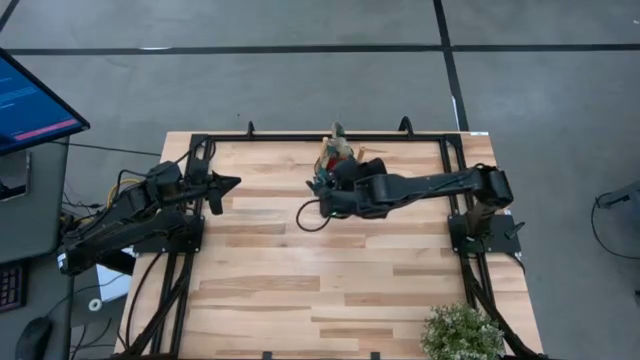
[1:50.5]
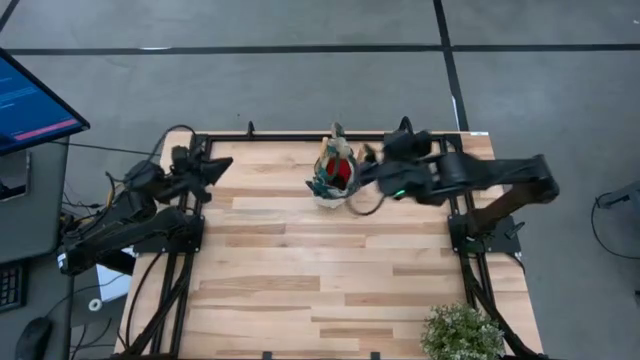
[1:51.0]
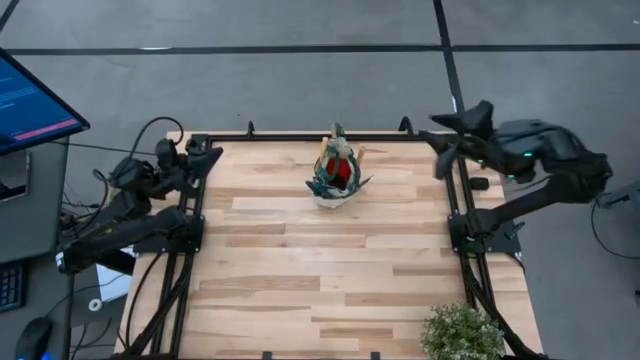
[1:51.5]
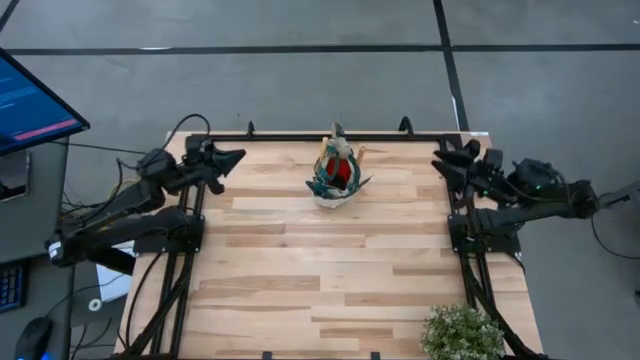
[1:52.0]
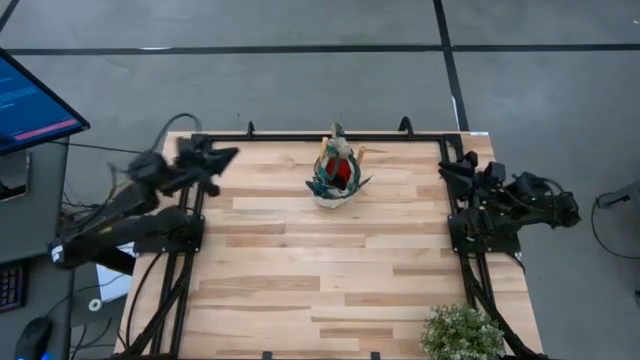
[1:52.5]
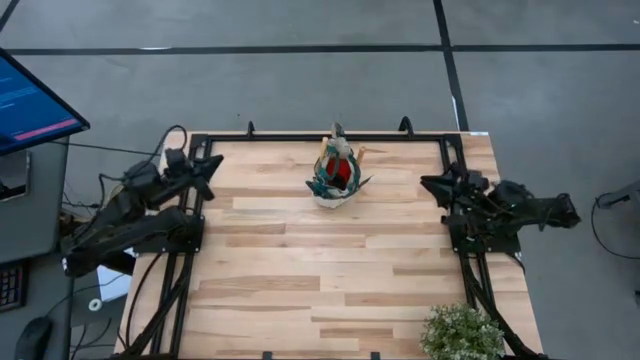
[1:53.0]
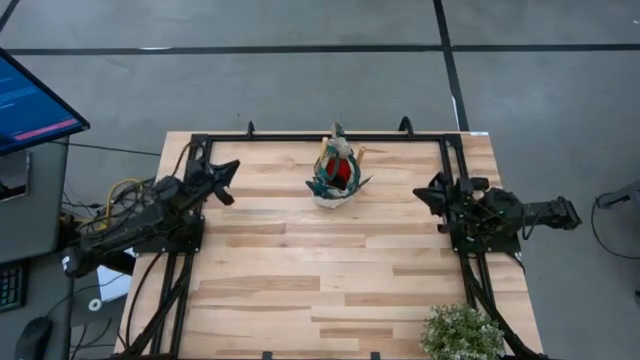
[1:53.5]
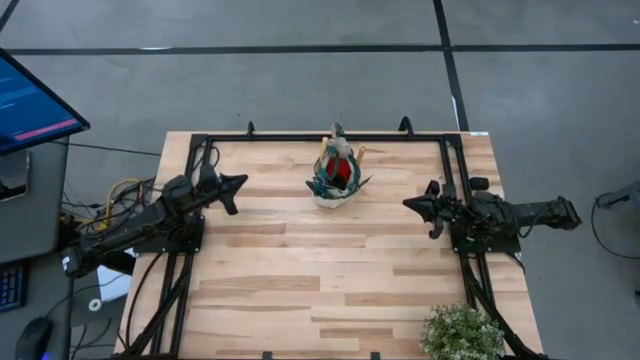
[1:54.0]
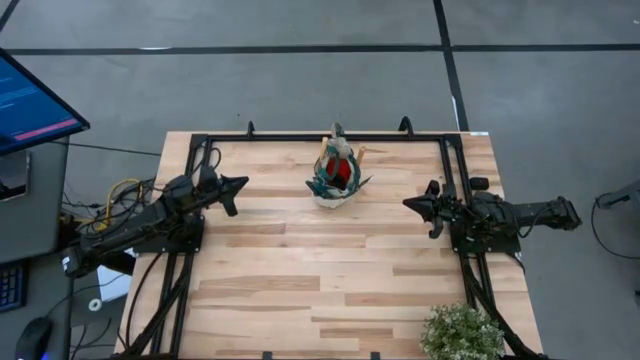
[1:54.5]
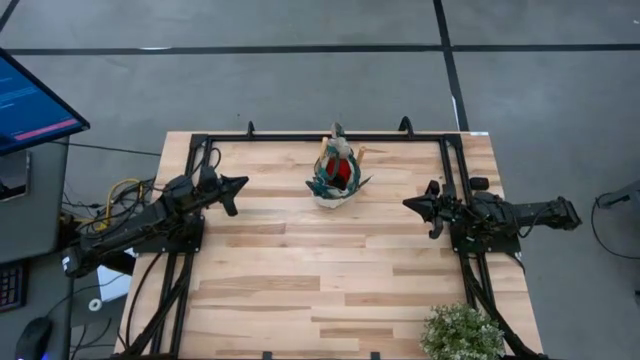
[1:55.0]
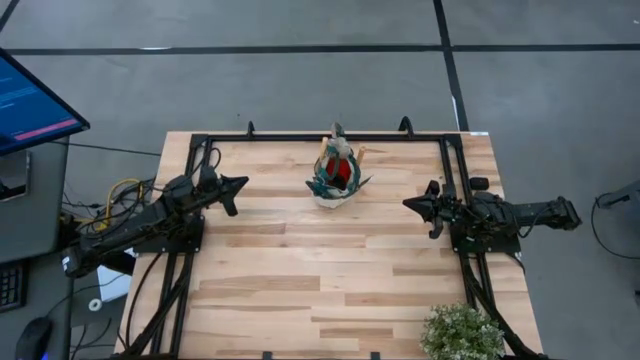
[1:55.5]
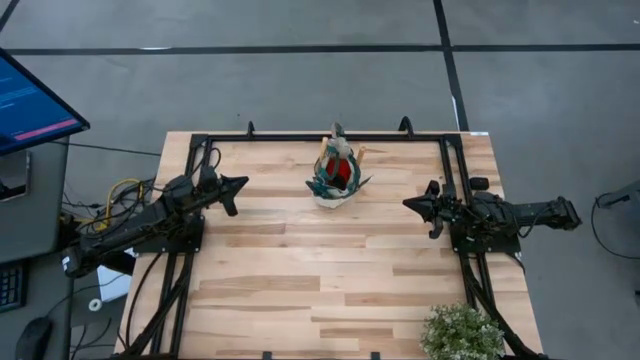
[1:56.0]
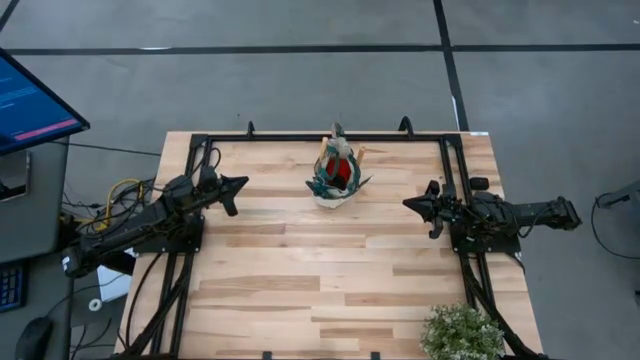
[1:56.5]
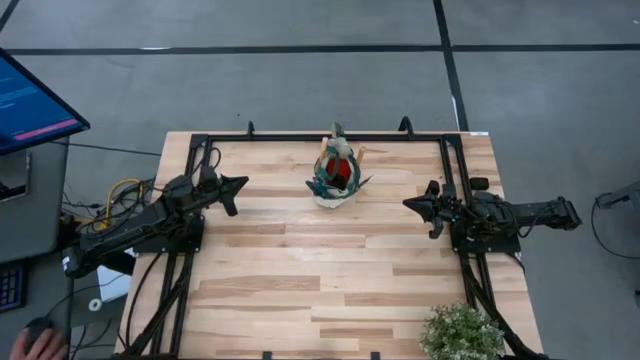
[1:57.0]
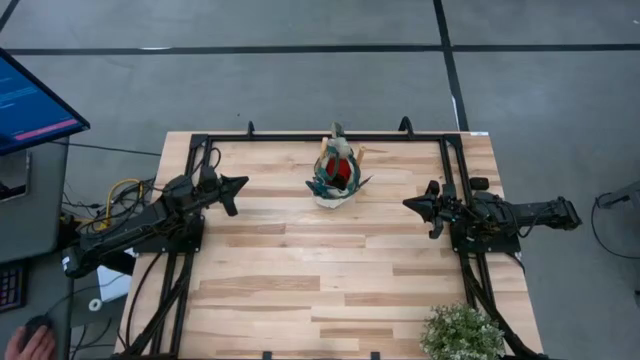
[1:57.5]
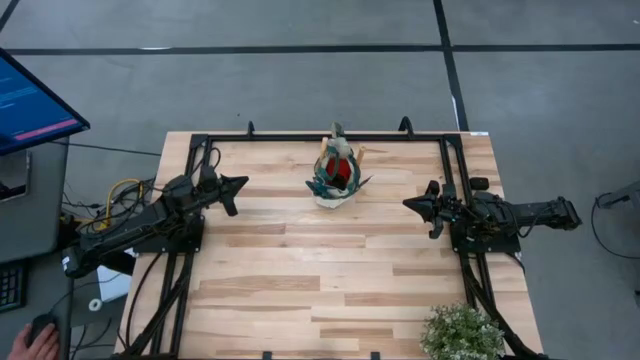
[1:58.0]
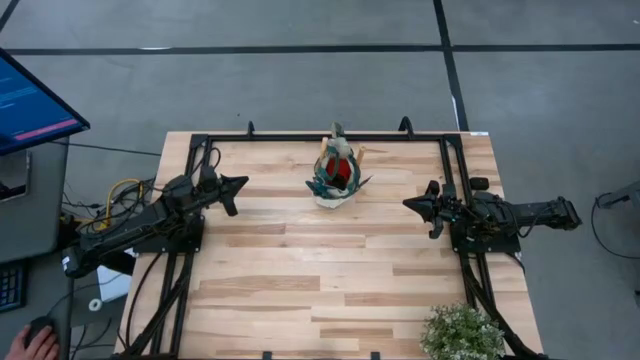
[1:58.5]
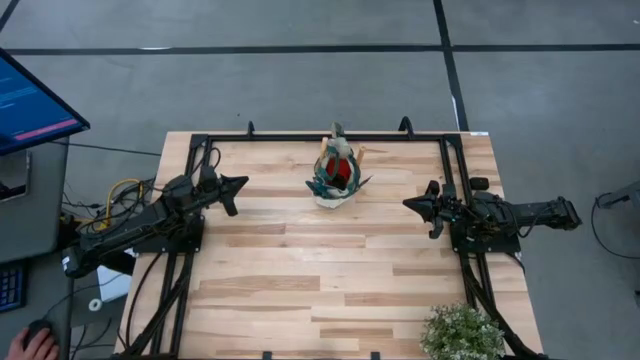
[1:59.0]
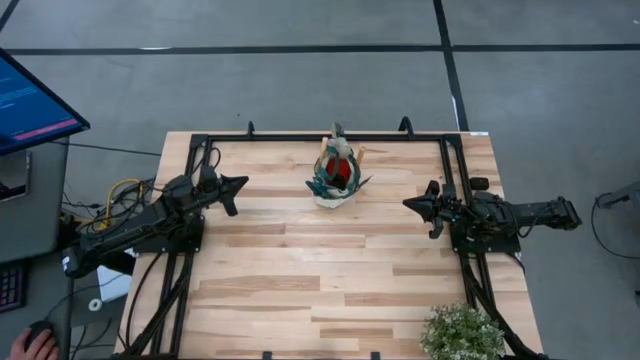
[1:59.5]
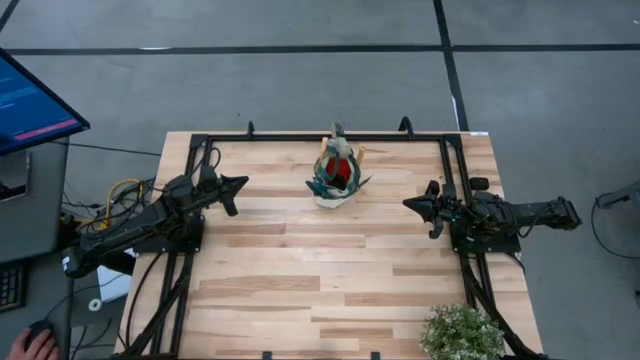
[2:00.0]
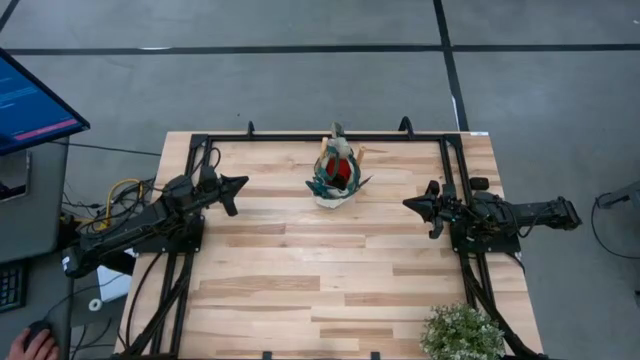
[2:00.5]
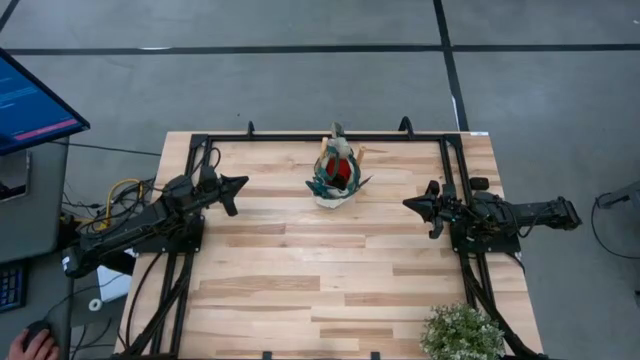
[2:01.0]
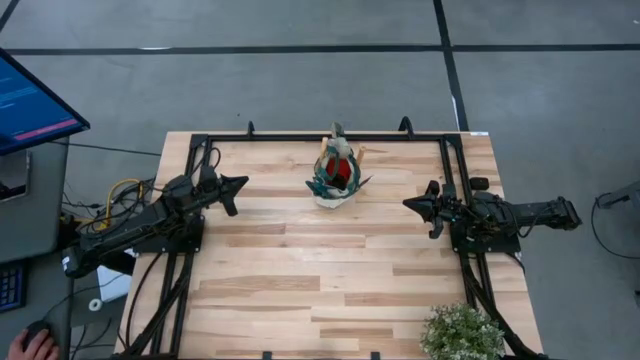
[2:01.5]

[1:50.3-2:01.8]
Task: Pick & Place Garden tools in Gardening bag
Return to Home Position

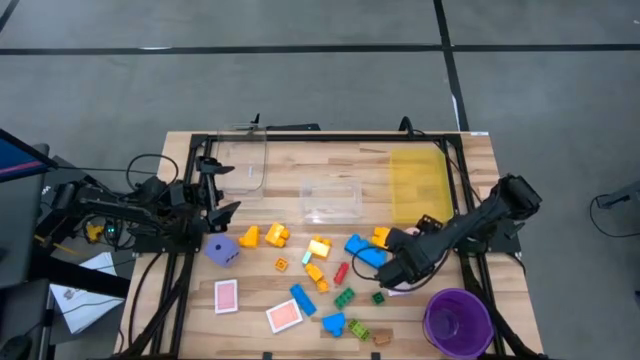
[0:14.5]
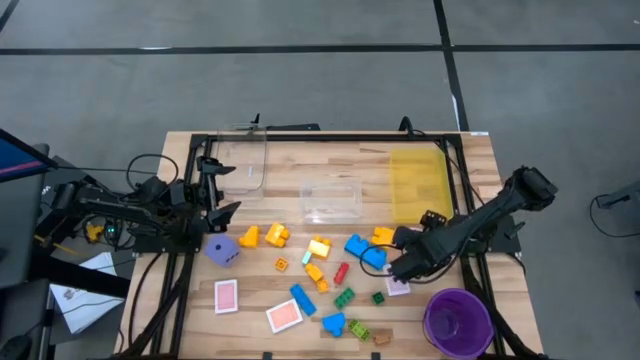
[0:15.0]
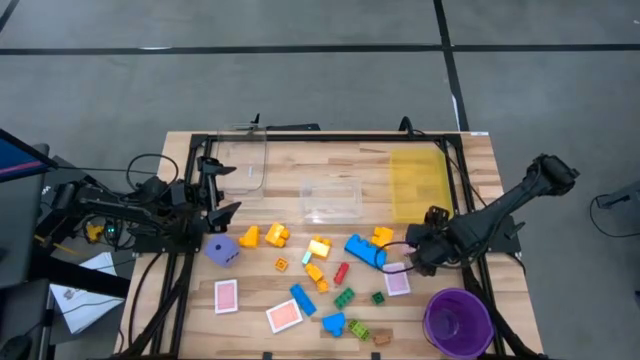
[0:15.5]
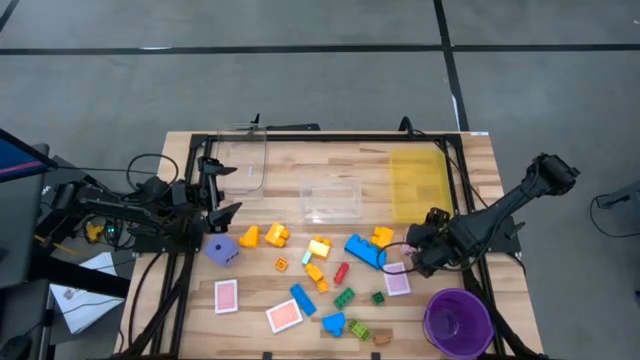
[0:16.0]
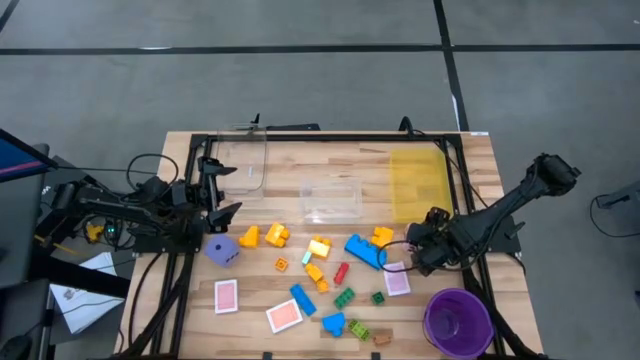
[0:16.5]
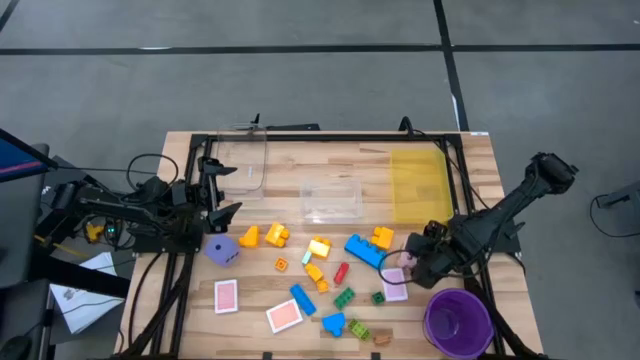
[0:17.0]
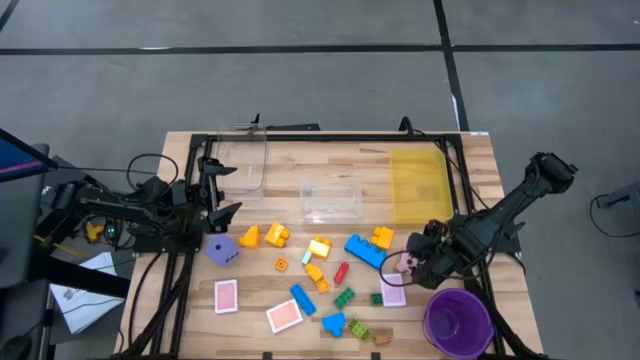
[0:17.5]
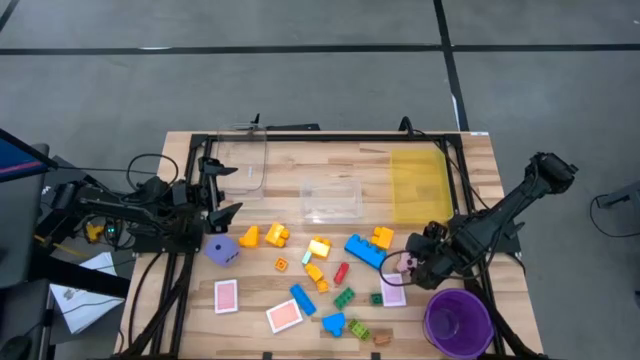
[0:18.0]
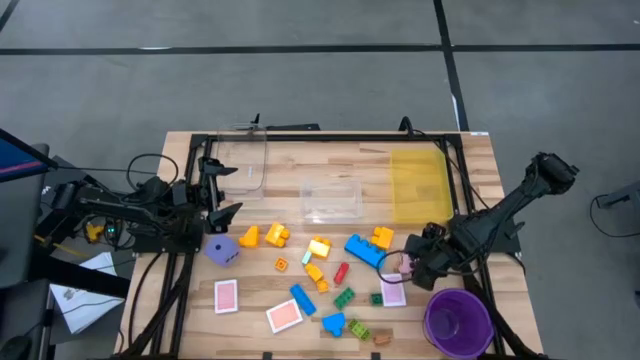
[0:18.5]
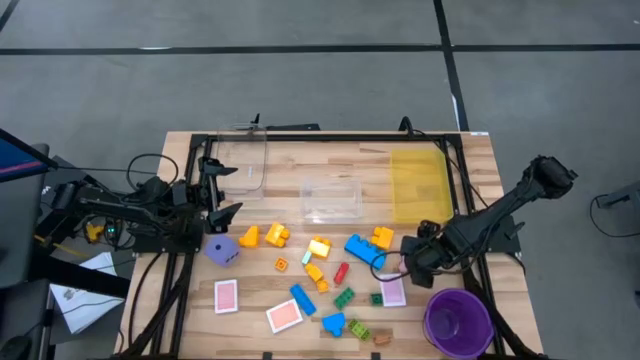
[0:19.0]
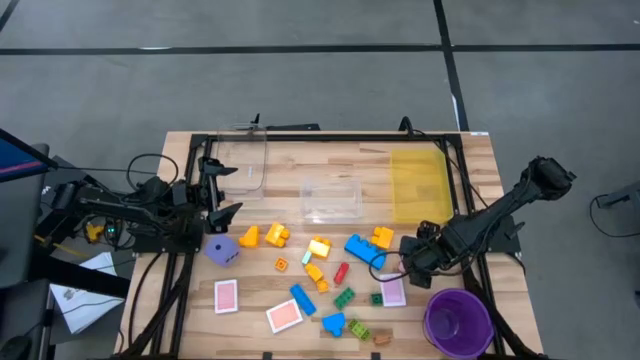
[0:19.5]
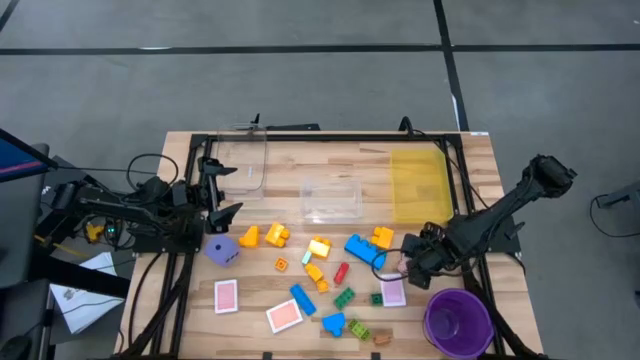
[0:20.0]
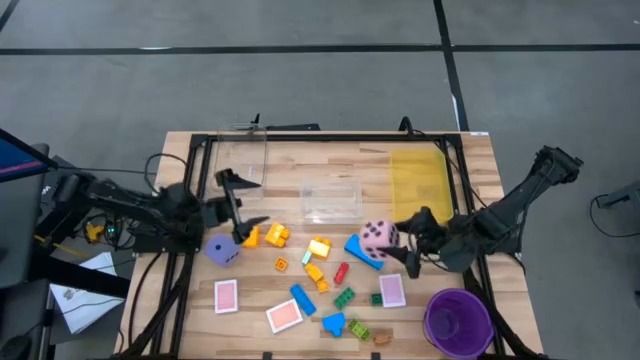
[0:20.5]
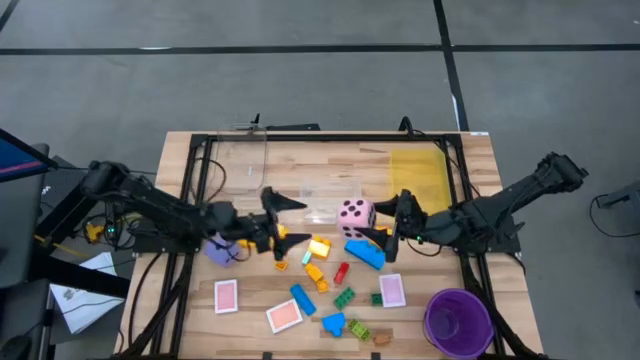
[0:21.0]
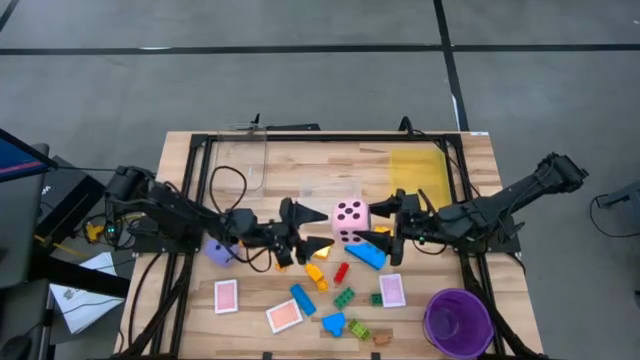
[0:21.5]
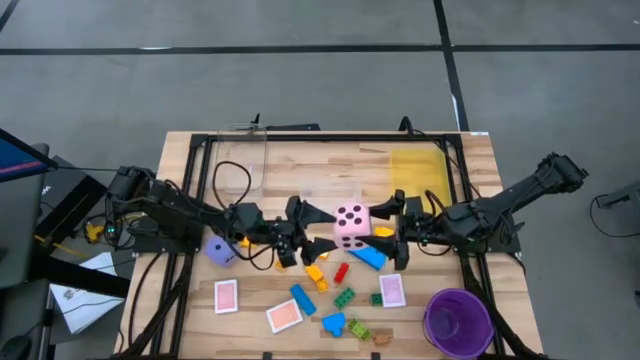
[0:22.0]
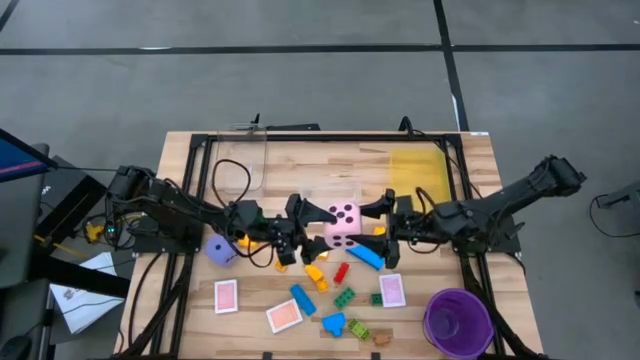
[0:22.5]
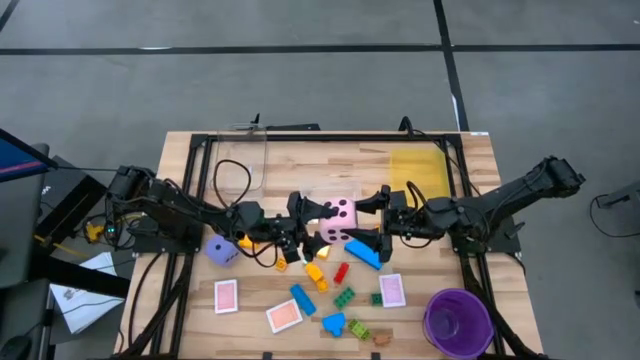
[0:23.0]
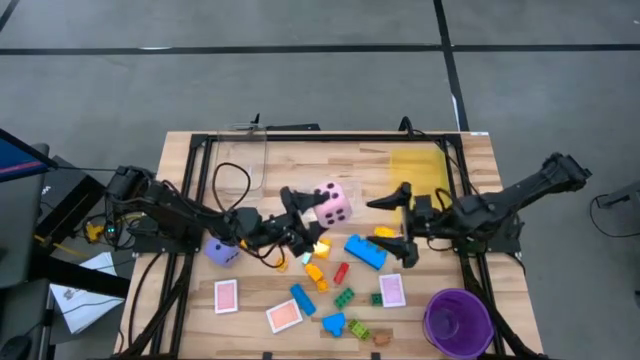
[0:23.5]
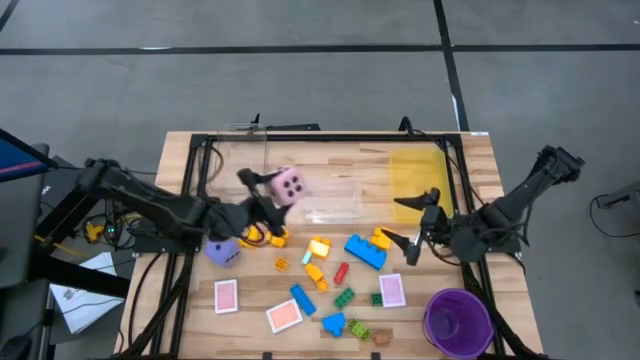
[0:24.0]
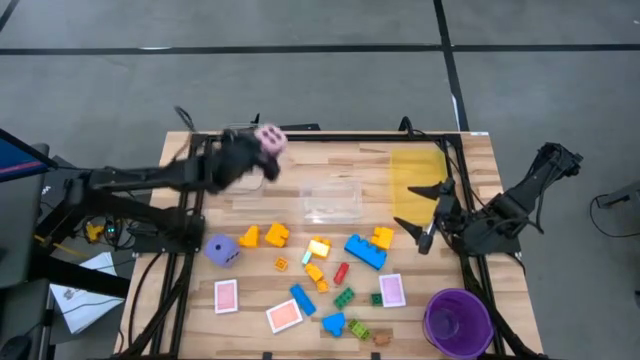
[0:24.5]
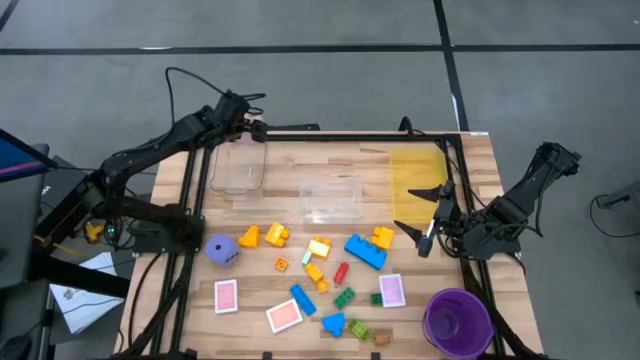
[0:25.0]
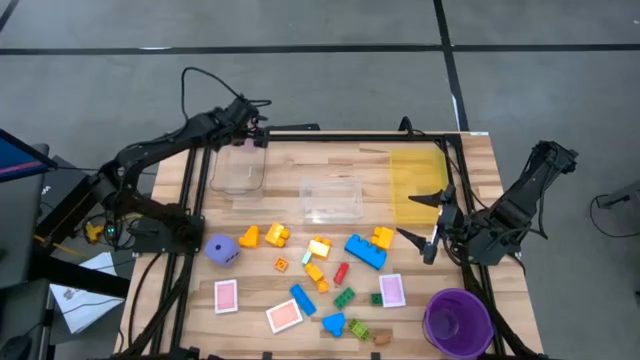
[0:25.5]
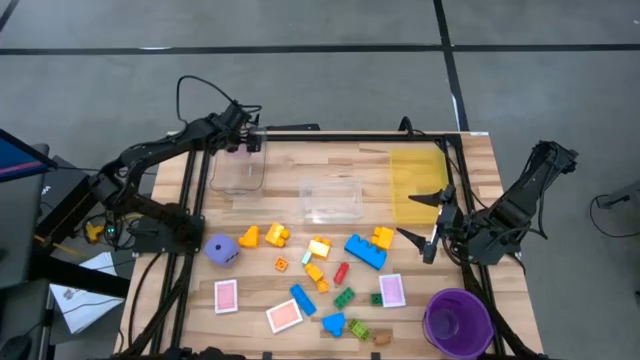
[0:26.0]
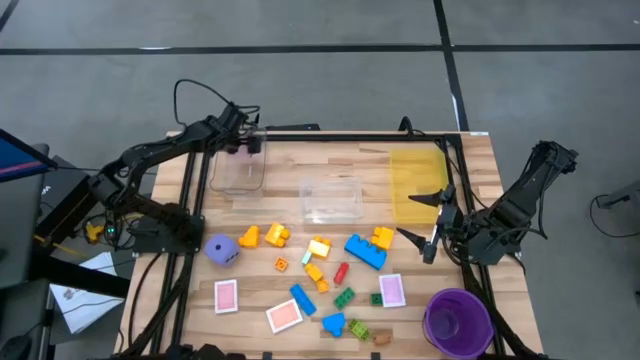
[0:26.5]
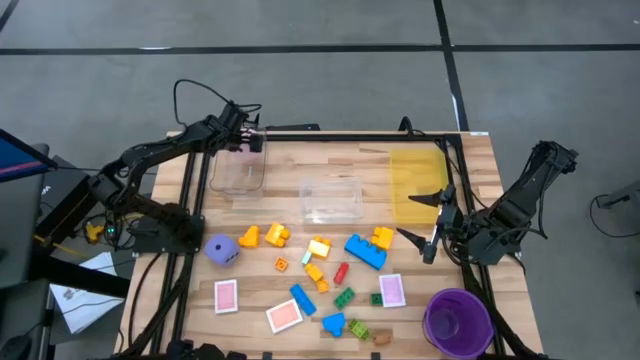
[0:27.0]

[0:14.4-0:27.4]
Task: Pick & Place Toys
Put the pink die into the top transparent bin
